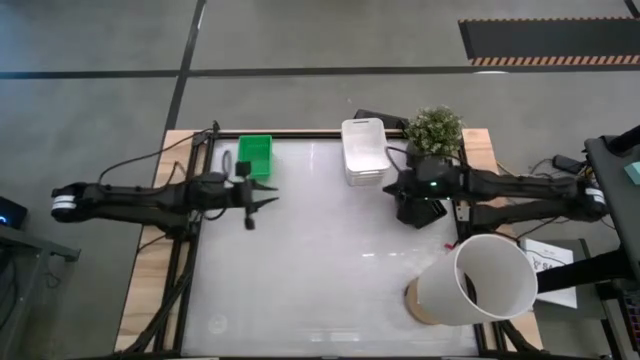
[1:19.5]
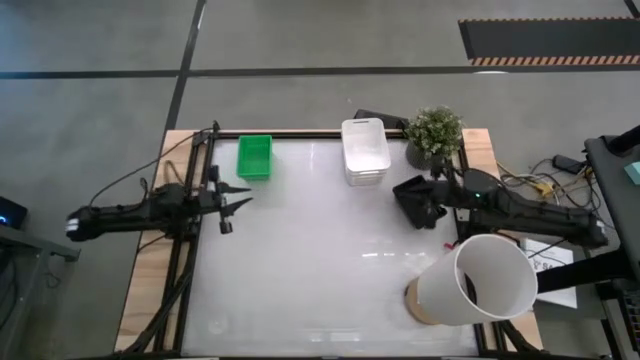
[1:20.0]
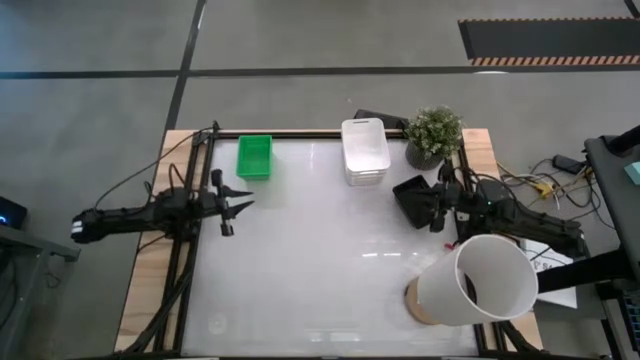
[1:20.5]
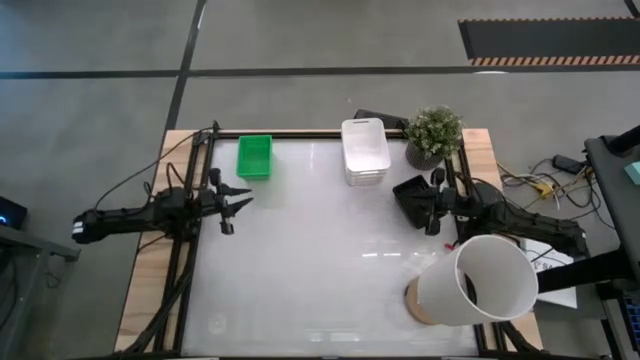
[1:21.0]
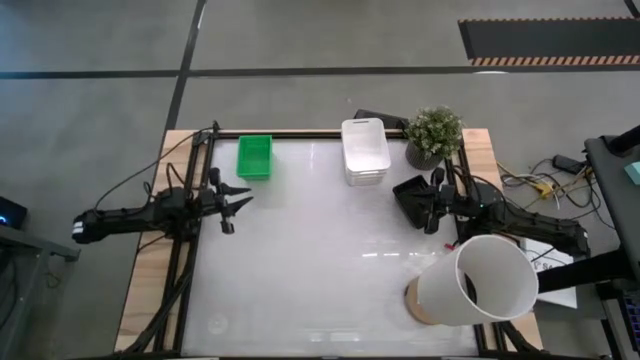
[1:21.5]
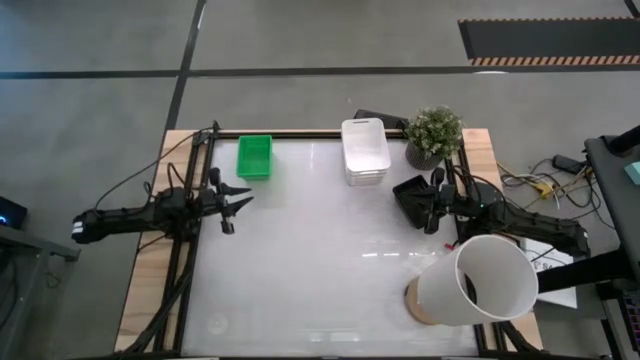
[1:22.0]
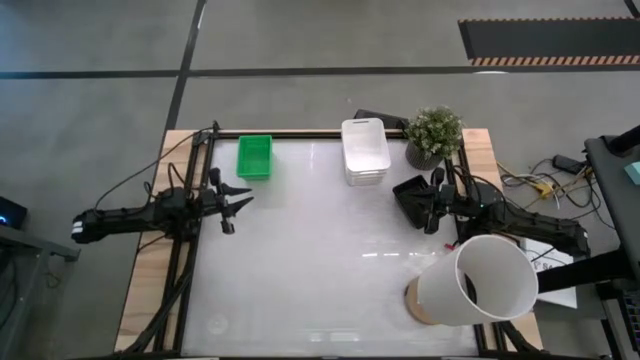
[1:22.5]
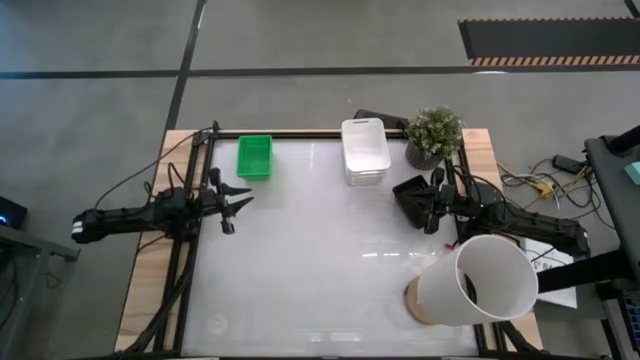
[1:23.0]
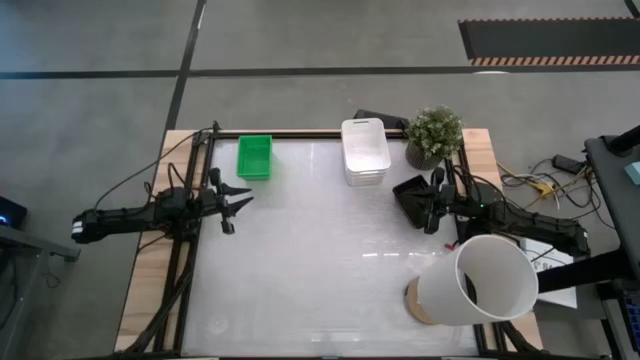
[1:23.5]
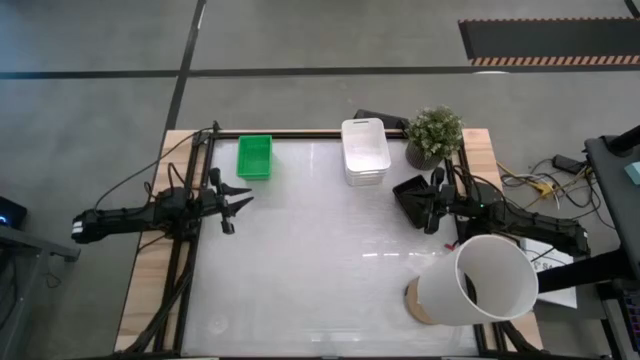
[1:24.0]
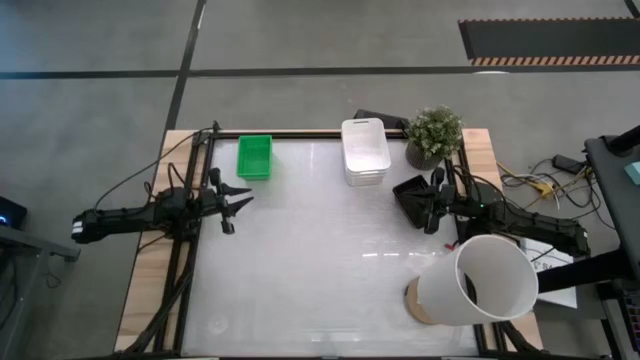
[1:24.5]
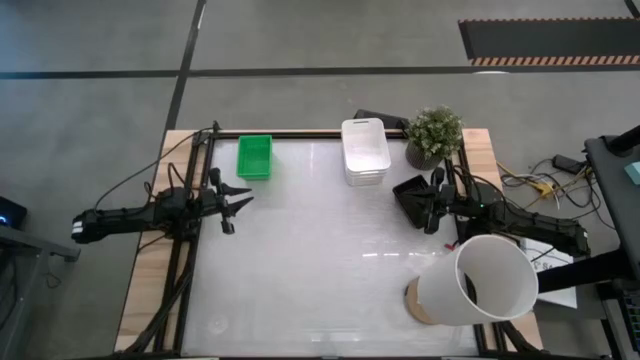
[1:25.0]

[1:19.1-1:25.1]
Return to Home Position
